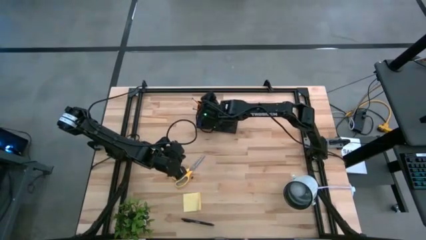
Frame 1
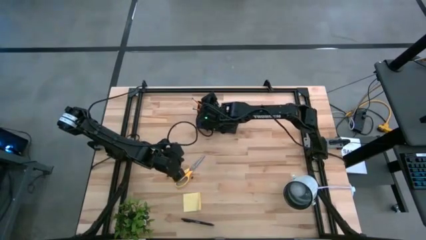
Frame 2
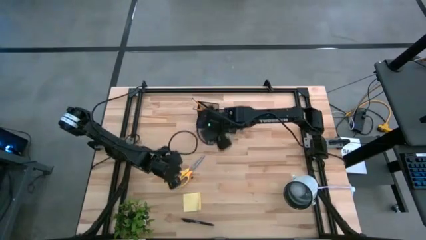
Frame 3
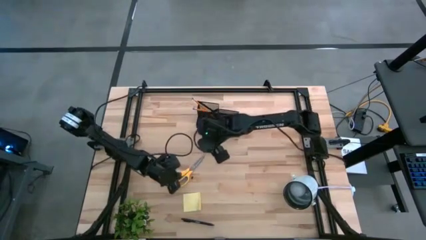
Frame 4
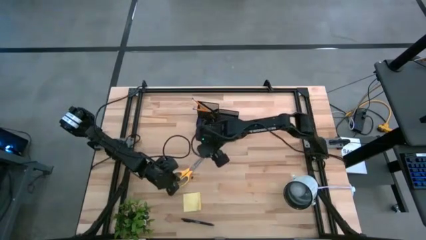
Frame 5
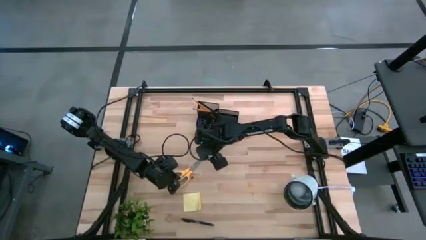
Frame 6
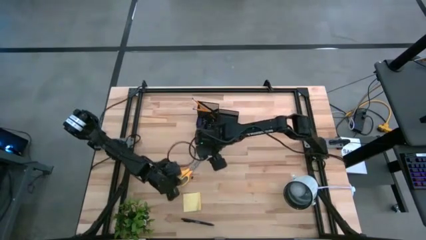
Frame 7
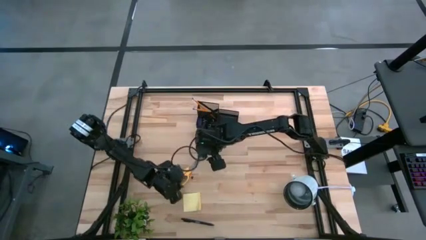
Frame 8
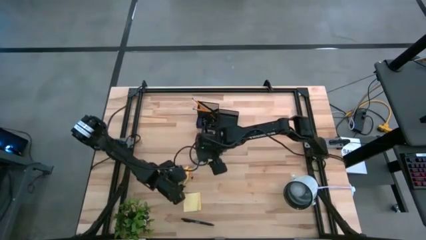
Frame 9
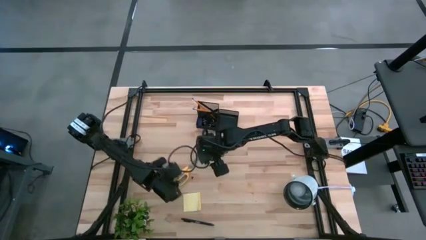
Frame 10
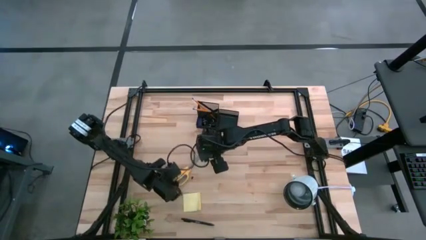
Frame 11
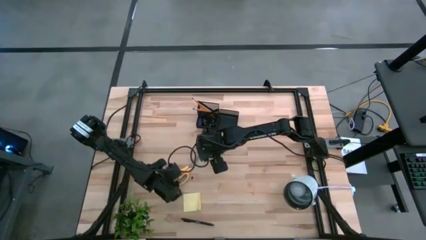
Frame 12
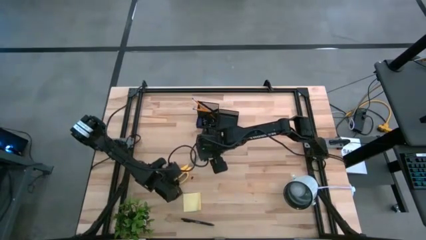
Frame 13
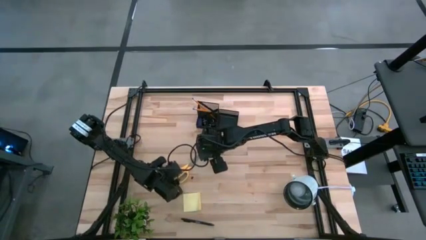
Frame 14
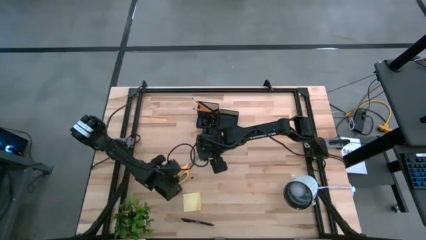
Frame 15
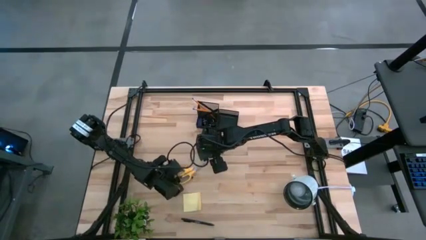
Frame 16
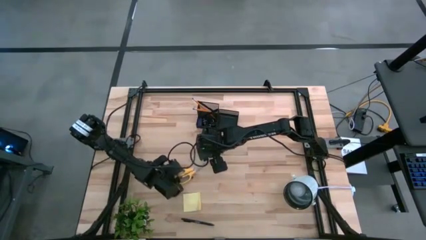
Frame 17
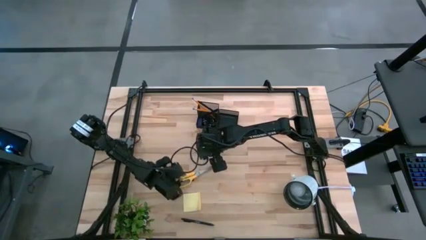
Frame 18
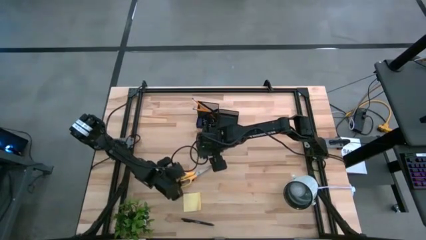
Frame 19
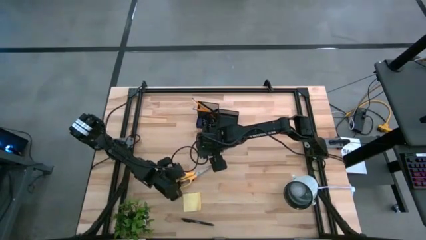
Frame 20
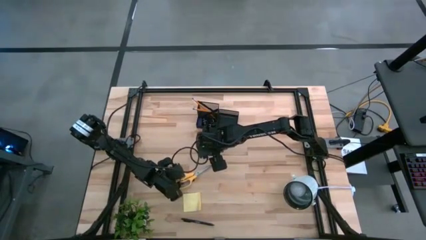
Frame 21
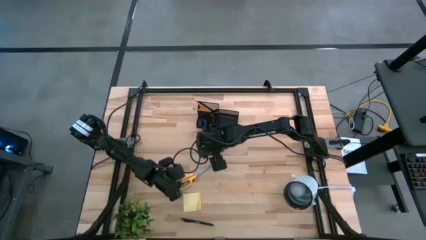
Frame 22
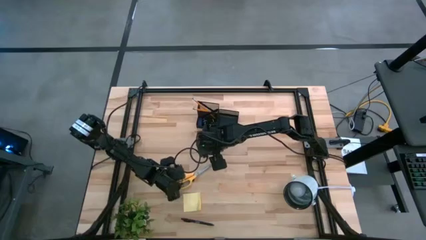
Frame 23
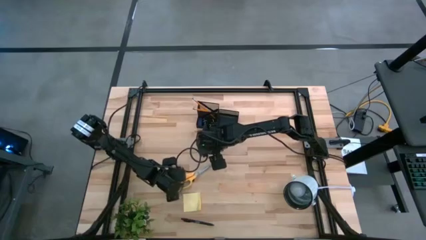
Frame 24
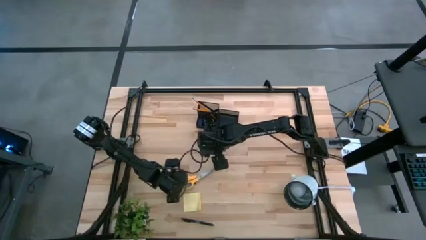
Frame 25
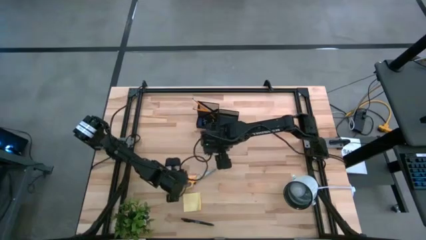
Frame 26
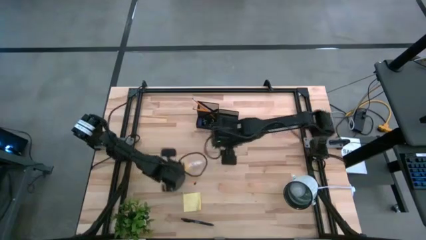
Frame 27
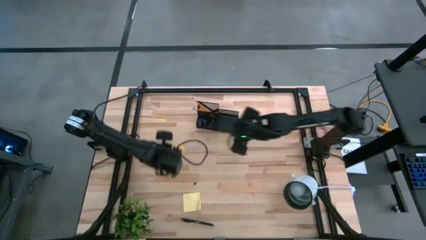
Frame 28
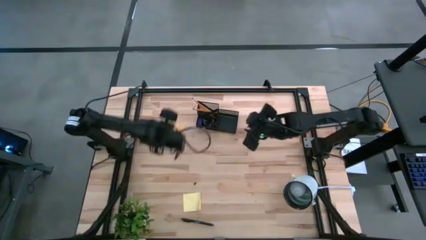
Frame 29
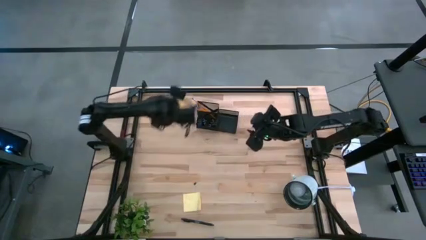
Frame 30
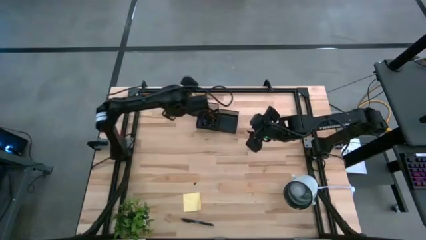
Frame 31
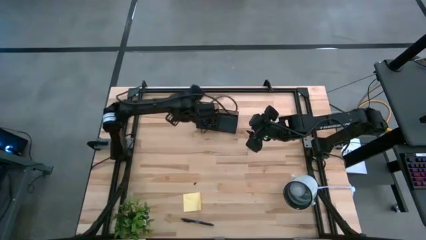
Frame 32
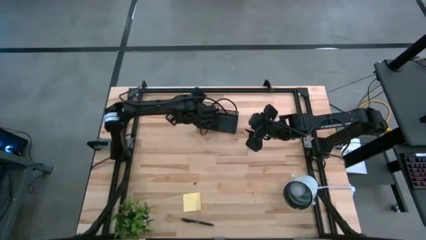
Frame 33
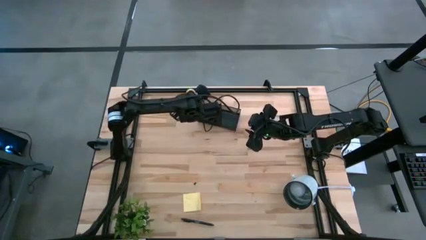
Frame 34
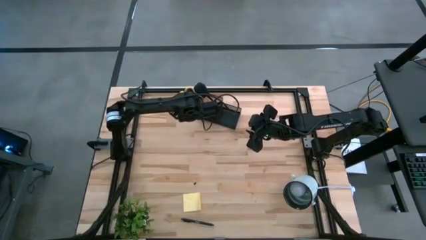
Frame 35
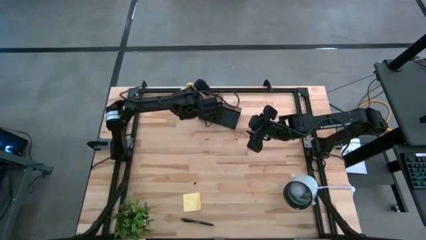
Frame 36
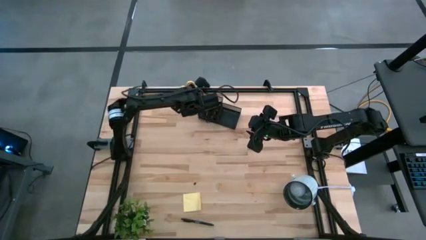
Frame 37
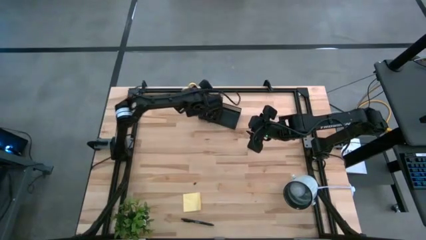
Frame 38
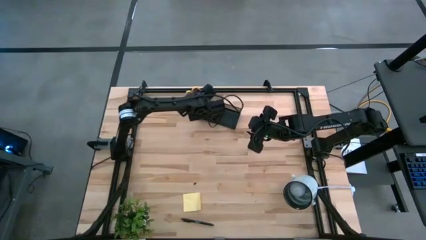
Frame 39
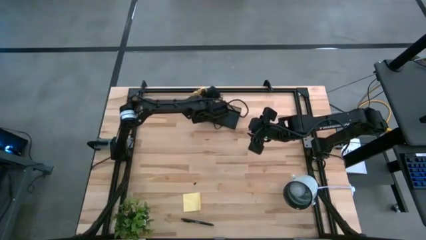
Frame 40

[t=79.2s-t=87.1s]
Task: Pick and place office supplies into organizer
Put the yellow scissors into the desk organizer

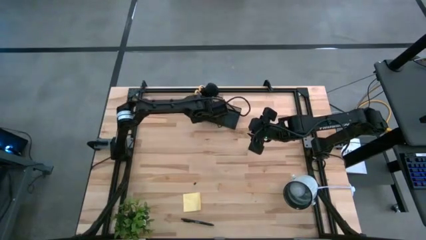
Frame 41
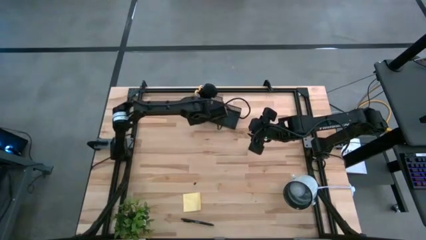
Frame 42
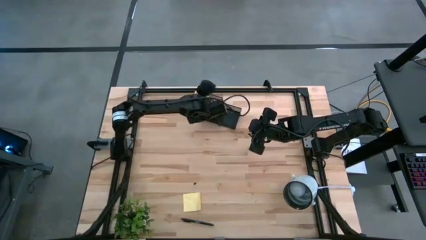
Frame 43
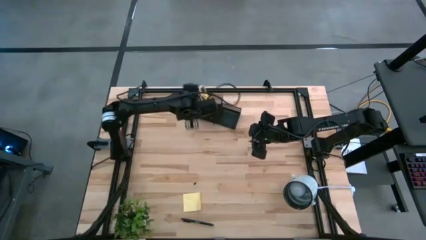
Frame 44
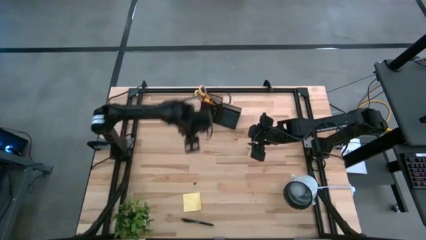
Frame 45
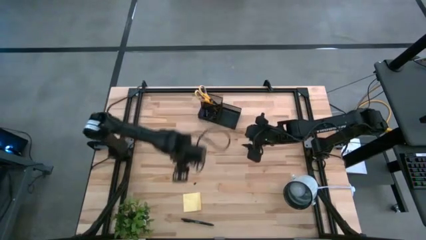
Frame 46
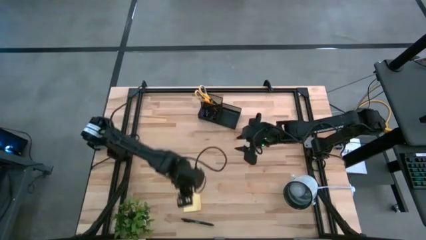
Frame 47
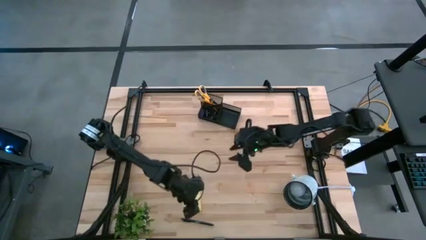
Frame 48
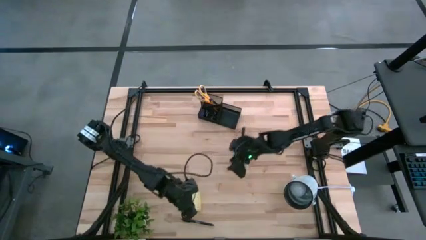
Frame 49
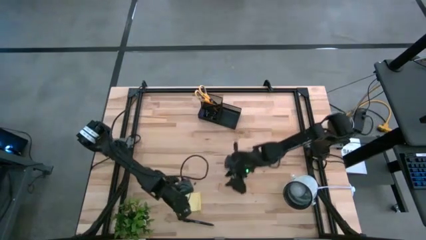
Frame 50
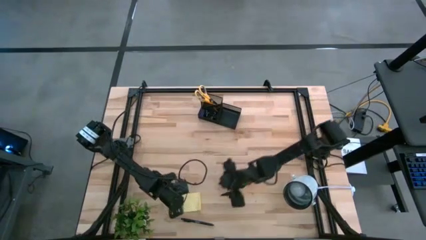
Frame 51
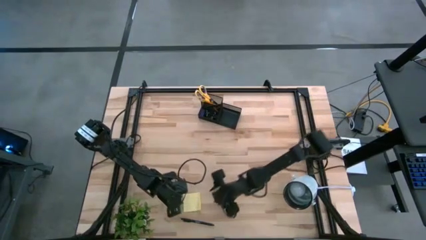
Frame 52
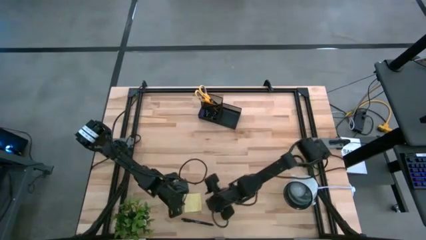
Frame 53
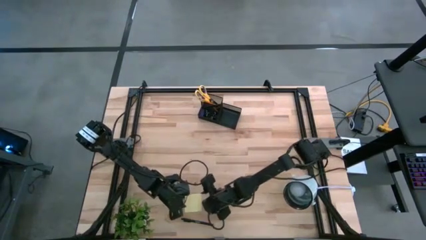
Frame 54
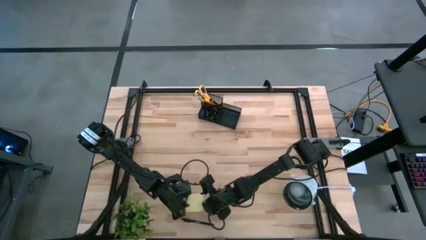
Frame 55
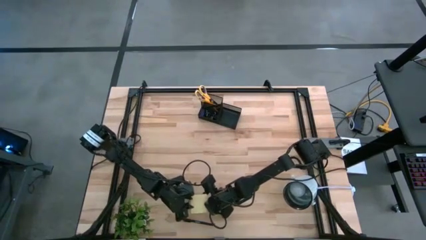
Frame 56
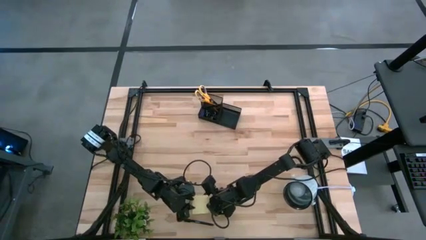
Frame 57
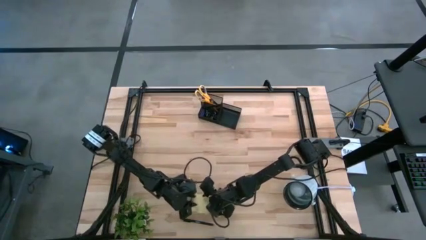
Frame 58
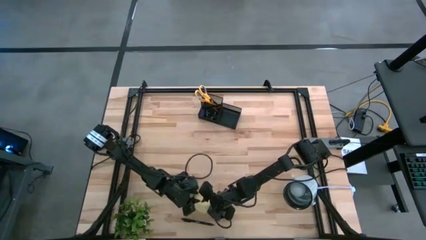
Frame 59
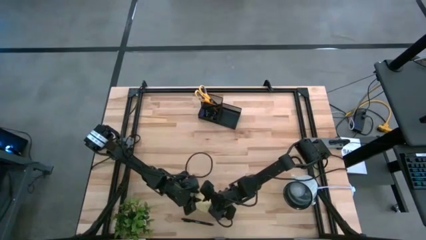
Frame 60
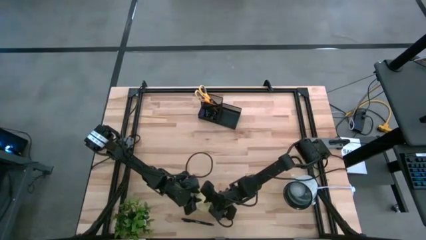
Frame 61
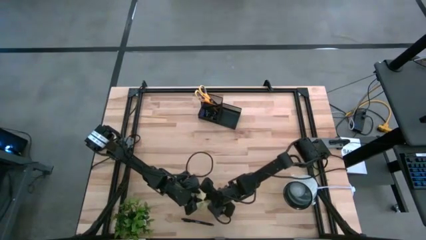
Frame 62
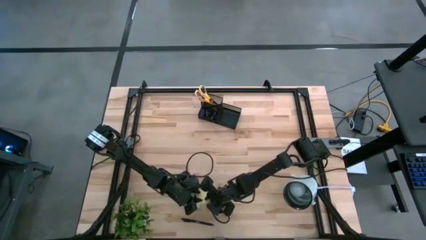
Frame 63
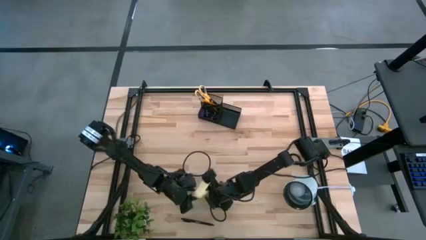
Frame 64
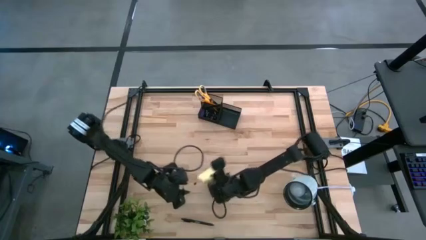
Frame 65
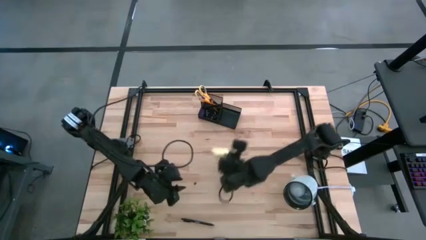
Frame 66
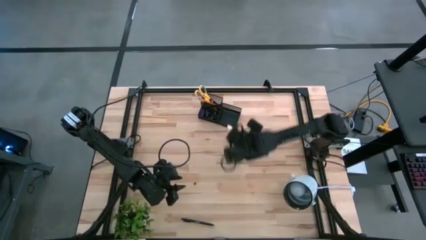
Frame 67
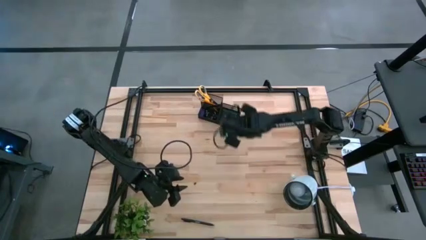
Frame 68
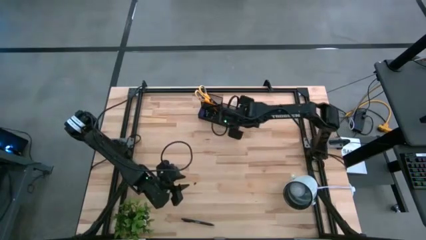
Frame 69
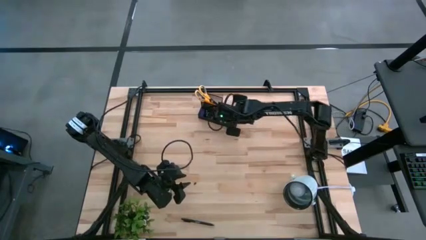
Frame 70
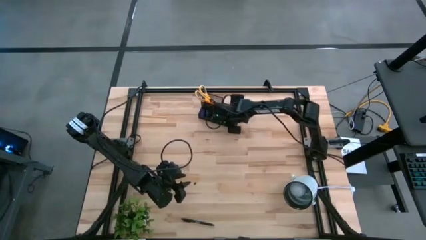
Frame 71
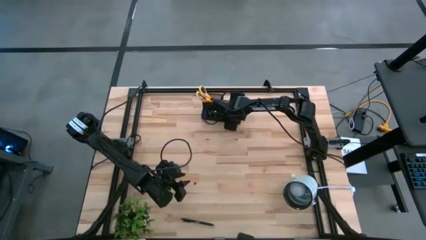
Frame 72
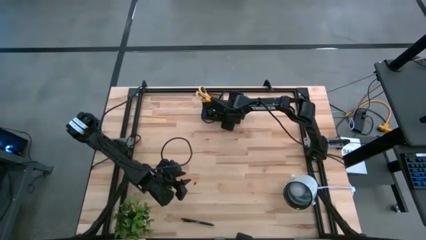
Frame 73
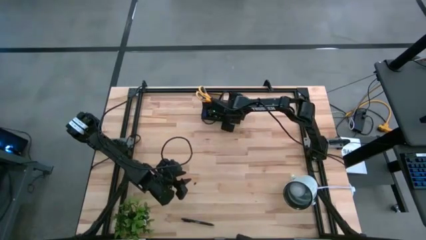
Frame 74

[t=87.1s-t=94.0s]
Put the yellow sticky note into the desk organizer

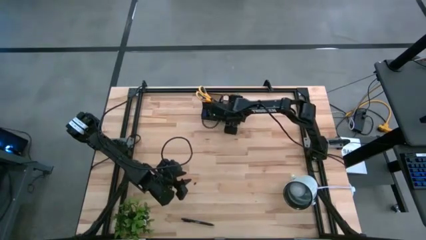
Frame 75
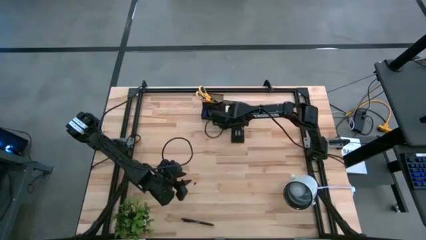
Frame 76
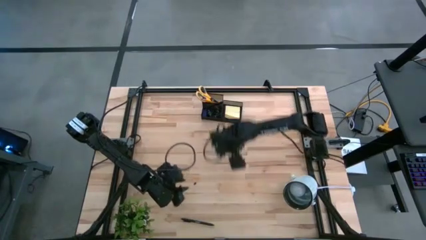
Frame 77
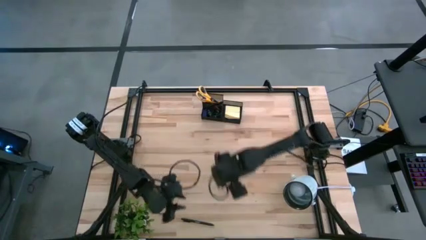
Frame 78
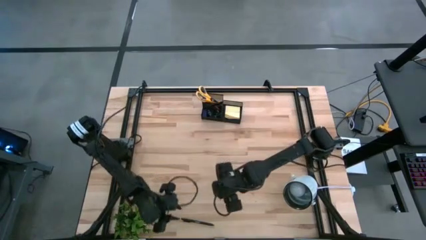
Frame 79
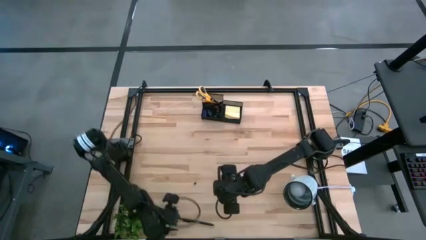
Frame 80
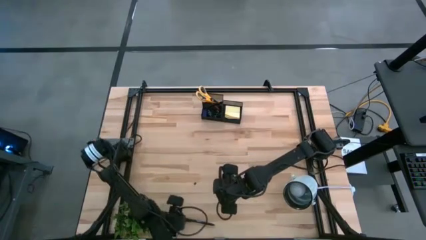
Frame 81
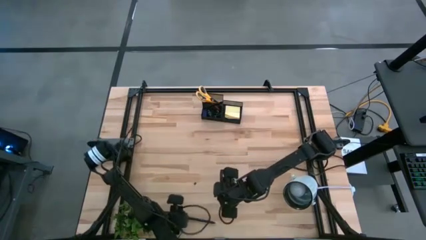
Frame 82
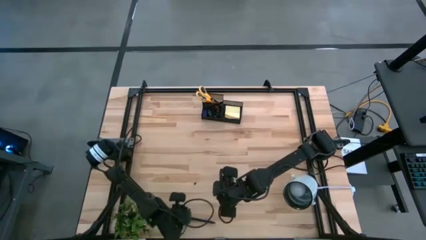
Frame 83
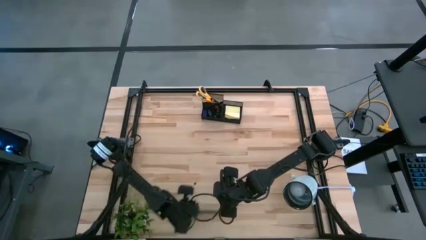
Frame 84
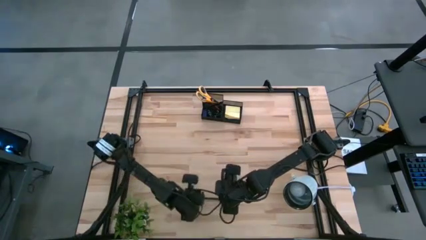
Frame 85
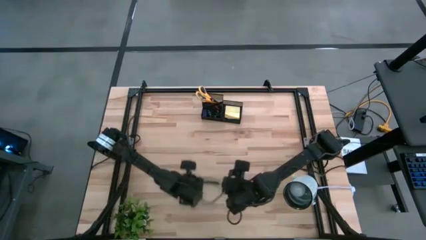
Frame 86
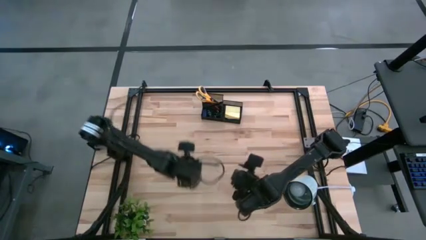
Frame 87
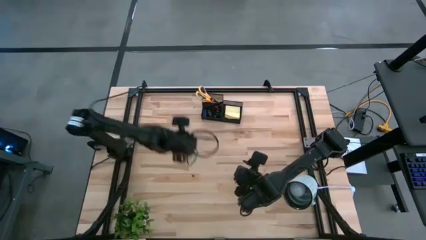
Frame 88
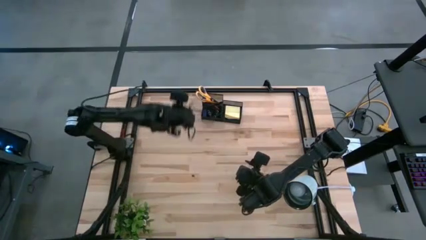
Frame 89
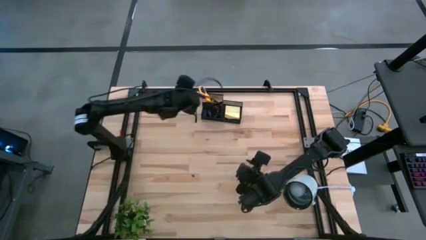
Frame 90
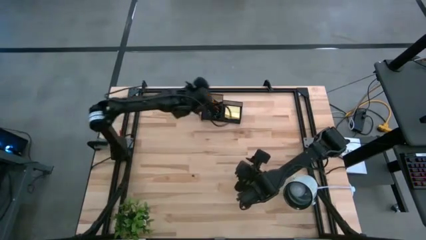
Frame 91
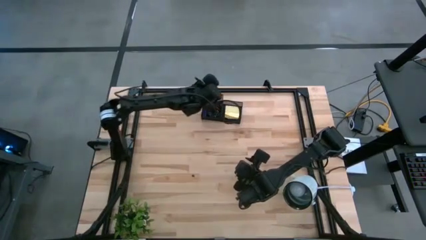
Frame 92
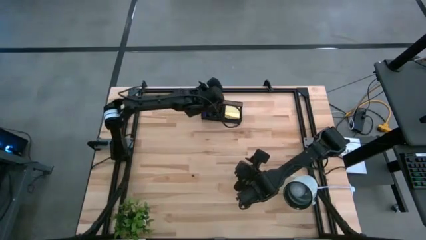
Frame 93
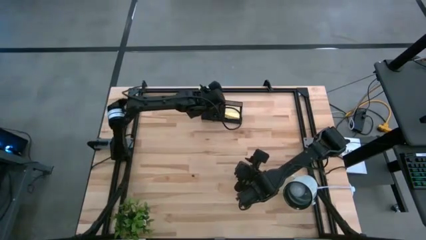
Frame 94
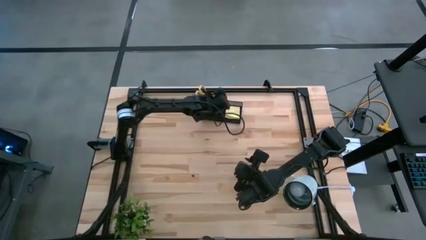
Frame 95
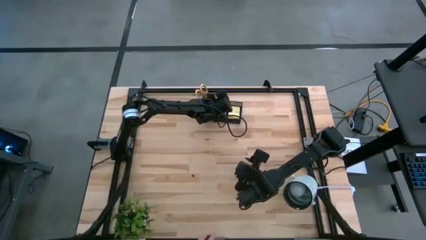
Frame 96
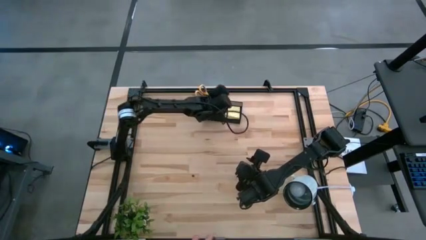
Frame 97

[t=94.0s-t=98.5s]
Put the black pen into the desk organizer
